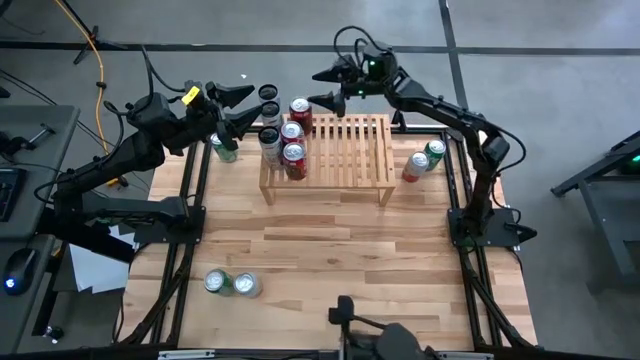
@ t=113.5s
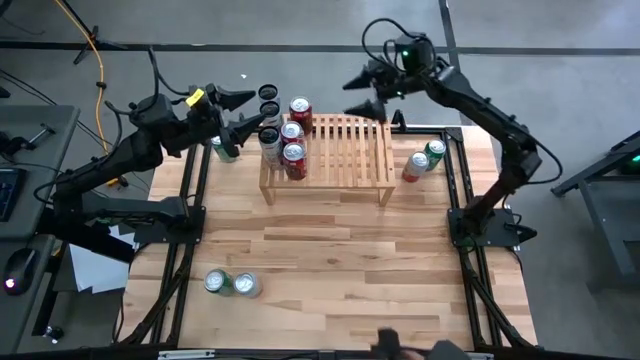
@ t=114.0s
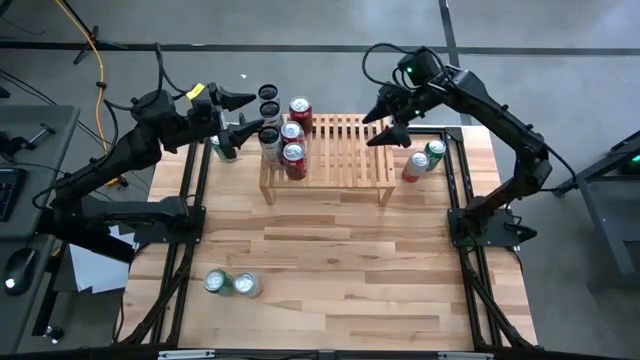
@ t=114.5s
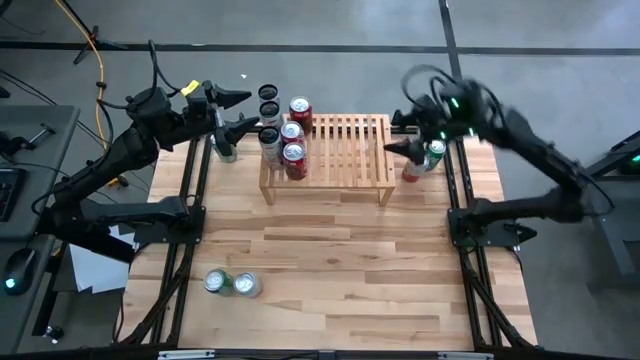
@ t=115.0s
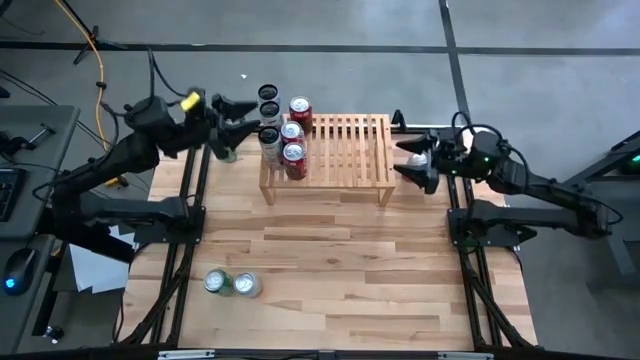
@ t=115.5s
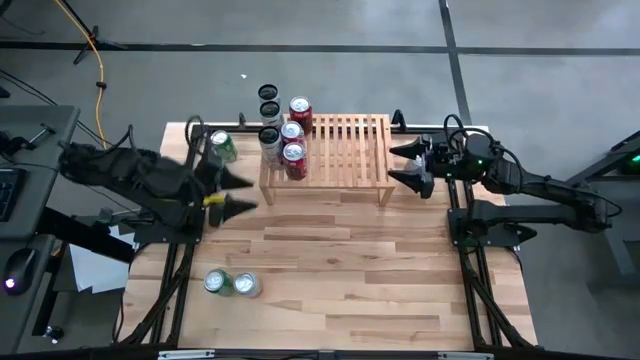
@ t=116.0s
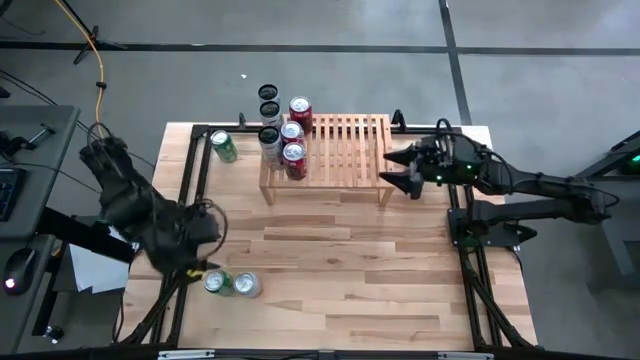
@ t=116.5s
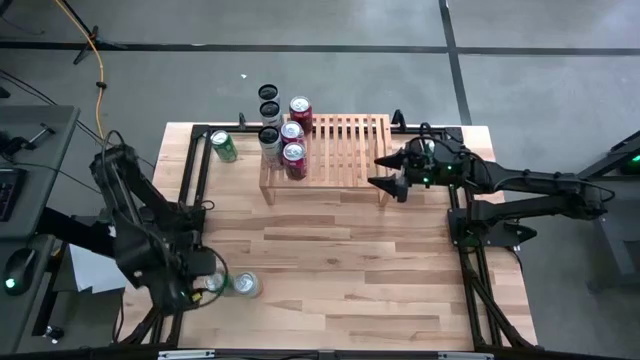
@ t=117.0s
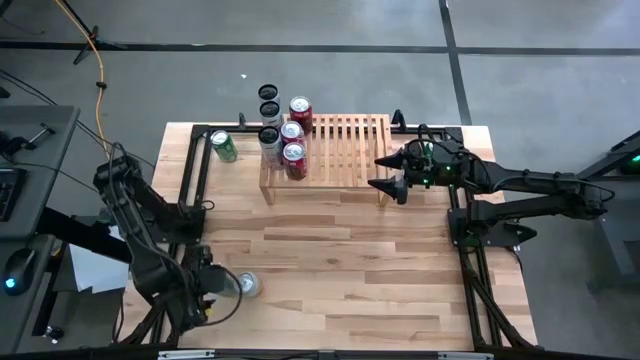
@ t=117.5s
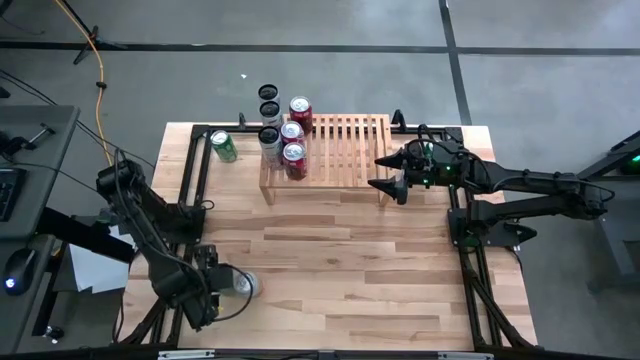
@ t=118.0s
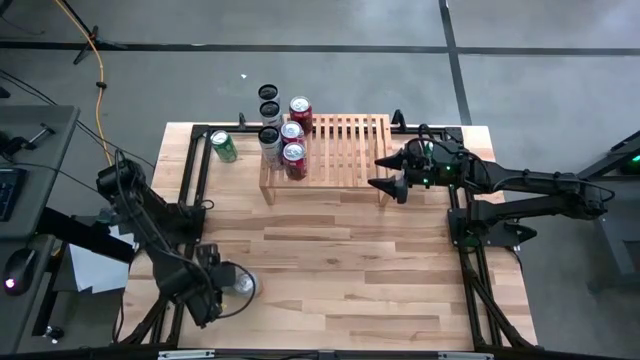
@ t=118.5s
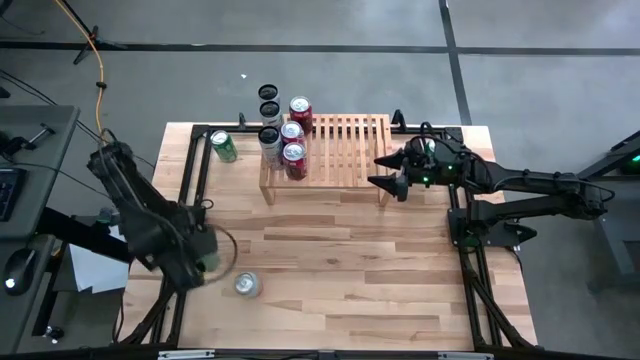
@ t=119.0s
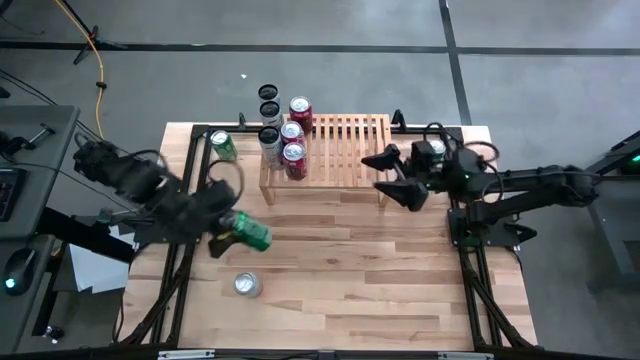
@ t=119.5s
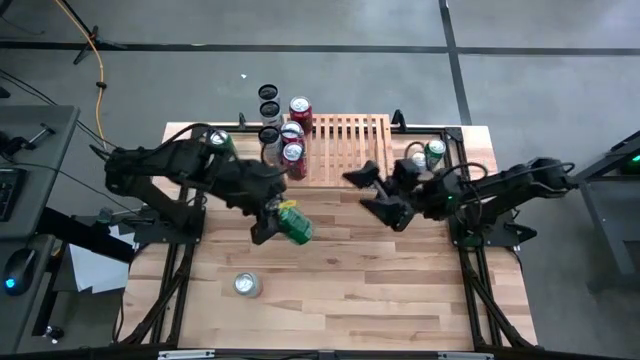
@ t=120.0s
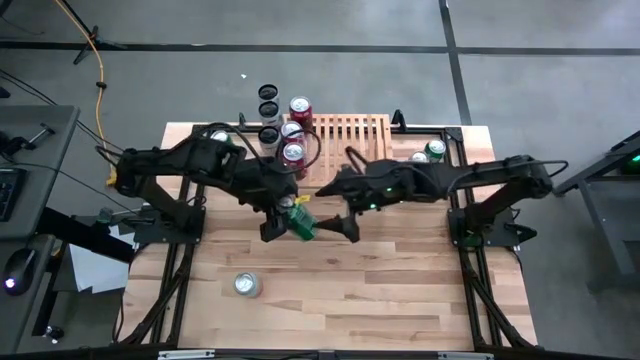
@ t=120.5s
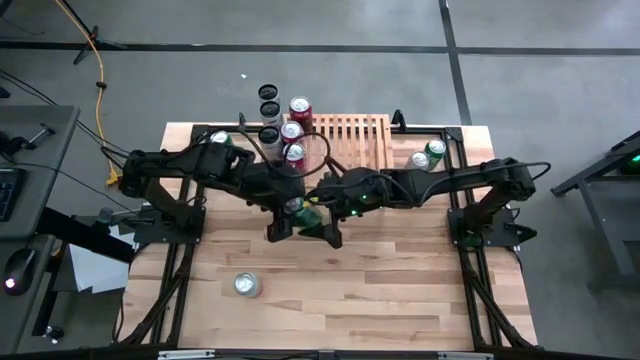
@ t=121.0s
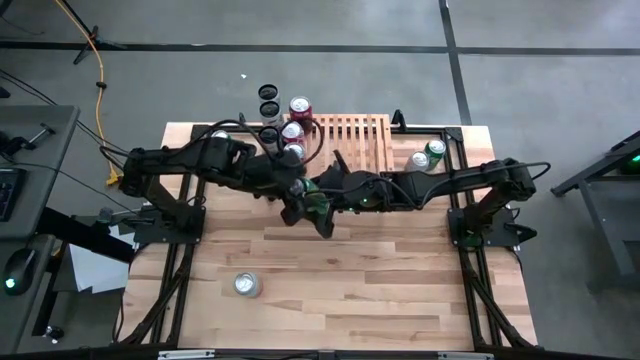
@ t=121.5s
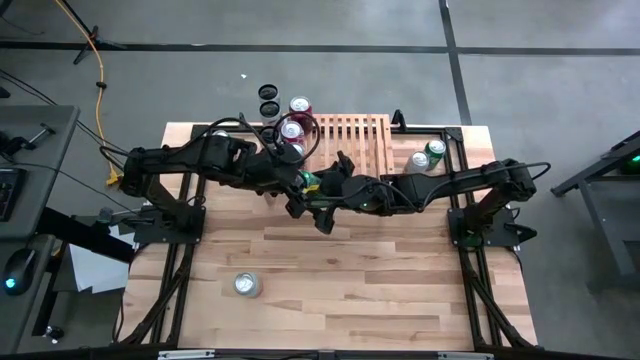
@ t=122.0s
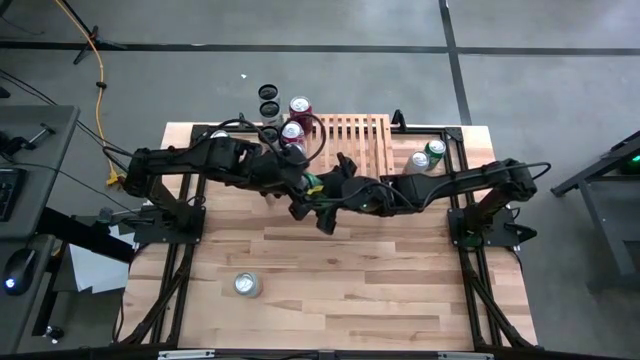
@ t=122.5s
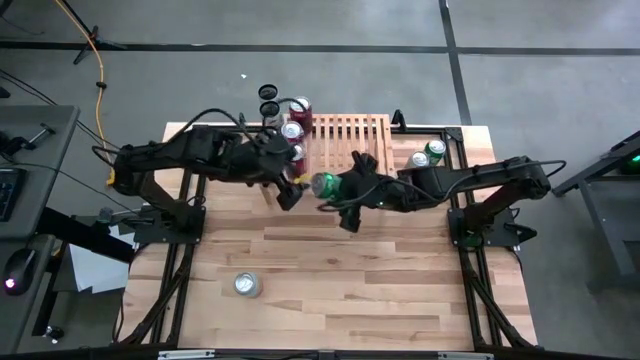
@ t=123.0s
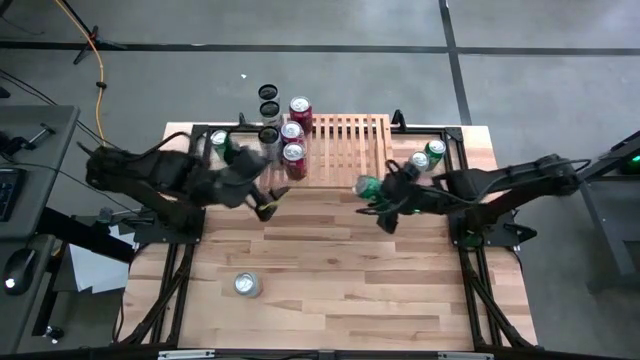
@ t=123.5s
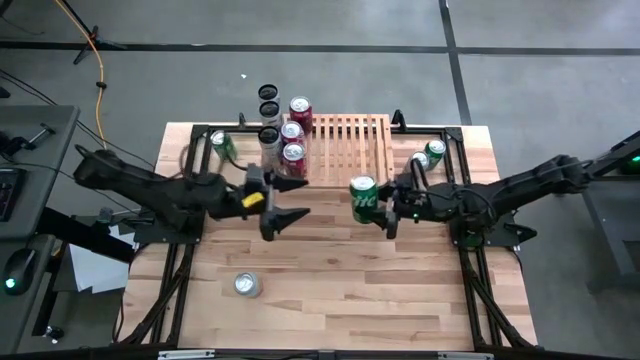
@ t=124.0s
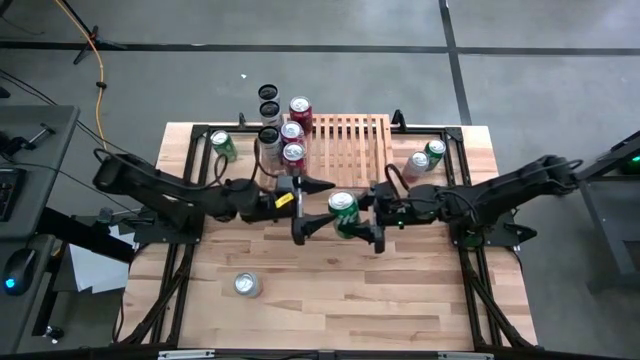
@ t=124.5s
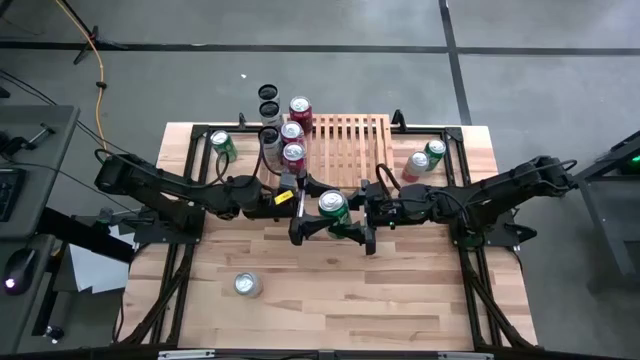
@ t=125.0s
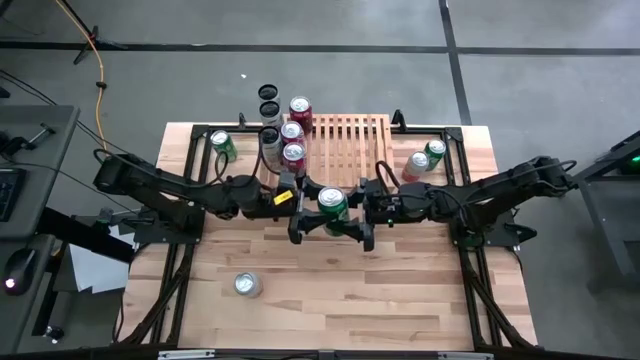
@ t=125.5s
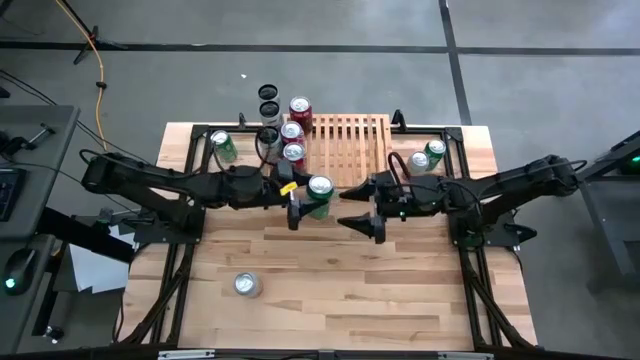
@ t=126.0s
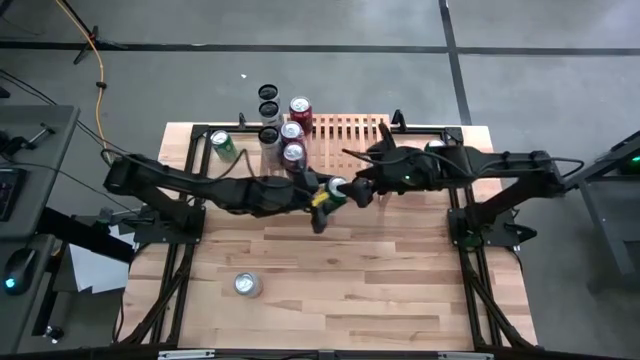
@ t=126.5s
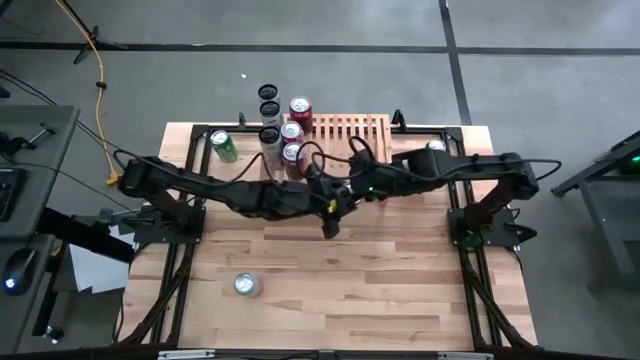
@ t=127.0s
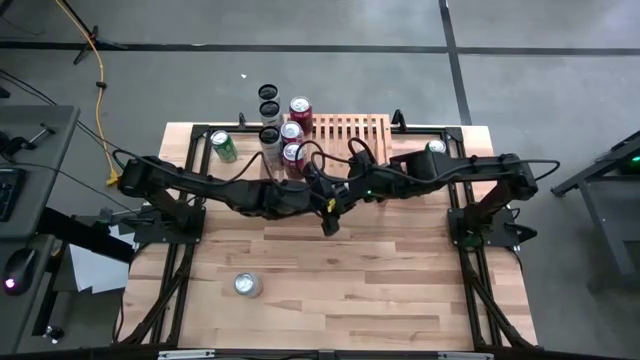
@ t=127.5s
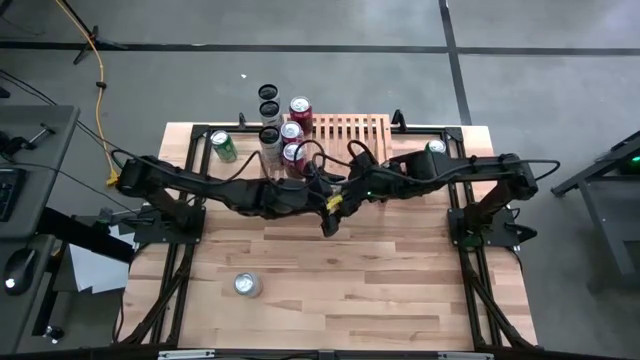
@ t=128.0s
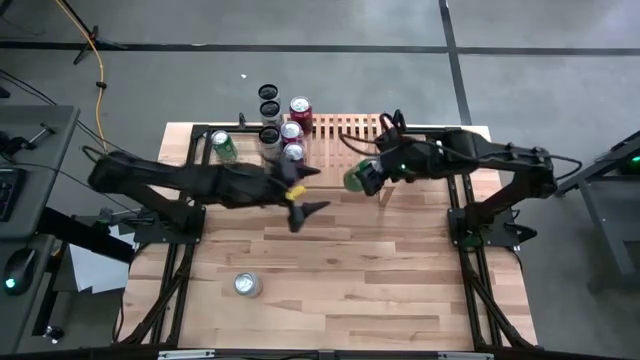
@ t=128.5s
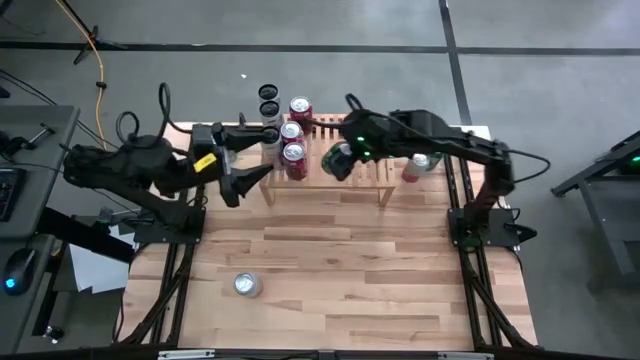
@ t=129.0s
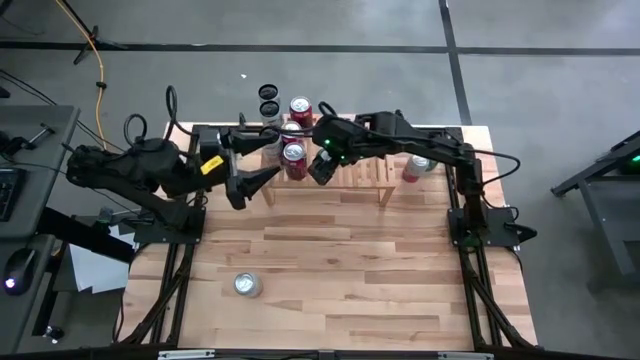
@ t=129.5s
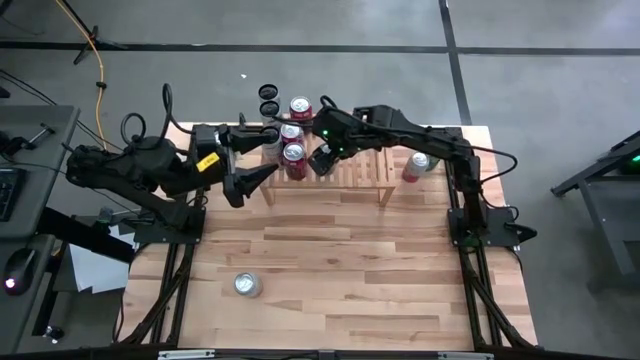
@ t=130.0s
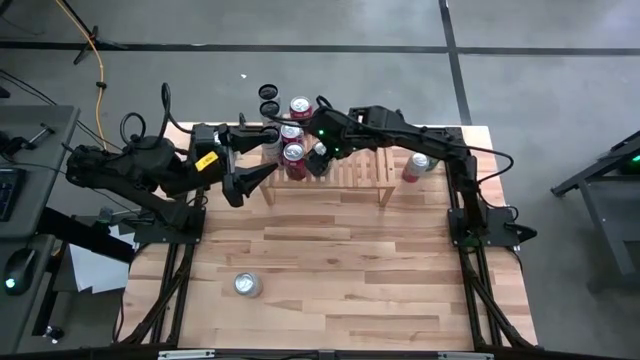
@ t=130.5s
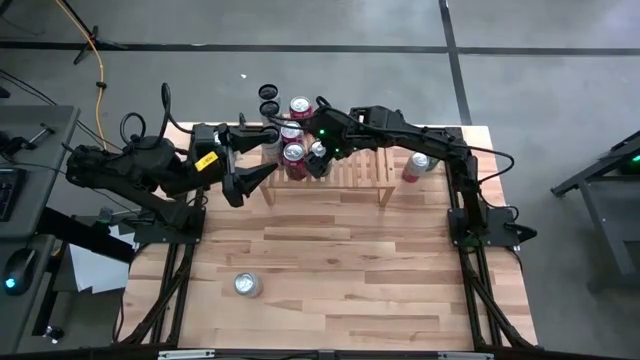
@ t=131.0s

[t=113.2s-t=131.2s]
Task: Place canned beverage on shelf
Put the bottom left green soda can on the shelf

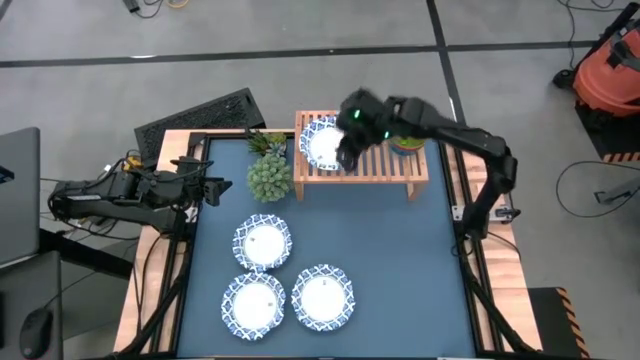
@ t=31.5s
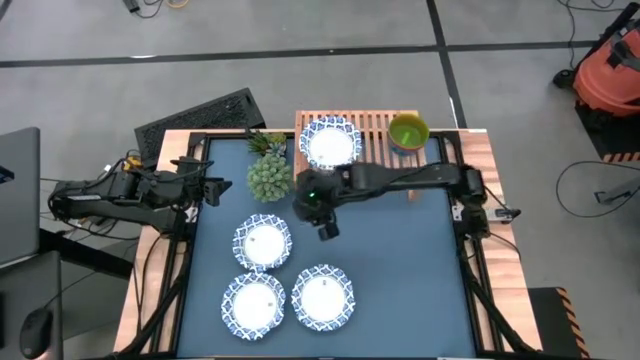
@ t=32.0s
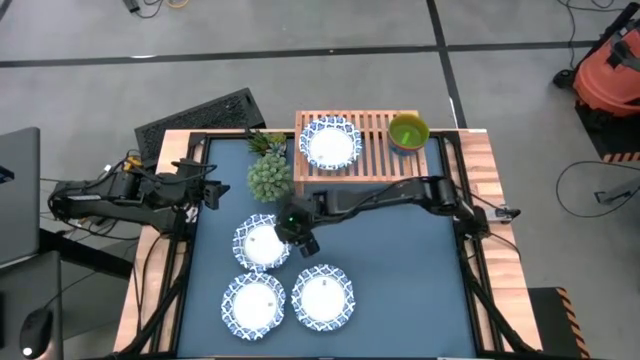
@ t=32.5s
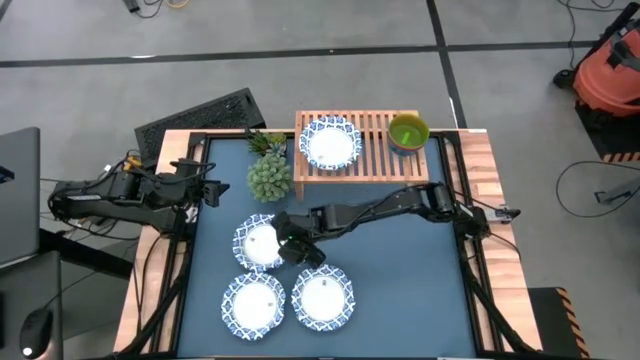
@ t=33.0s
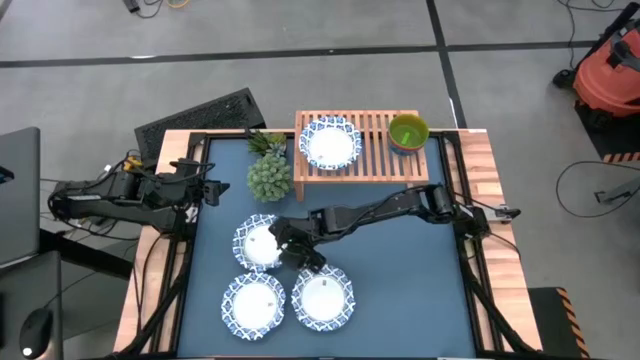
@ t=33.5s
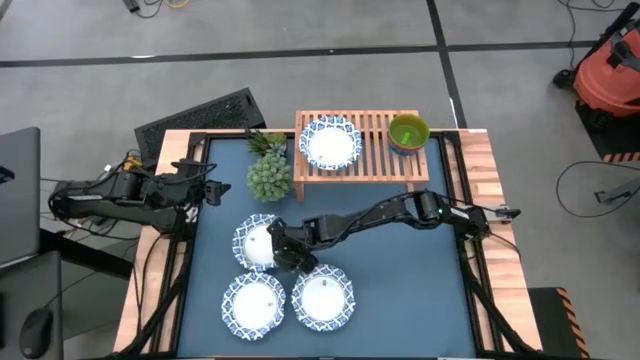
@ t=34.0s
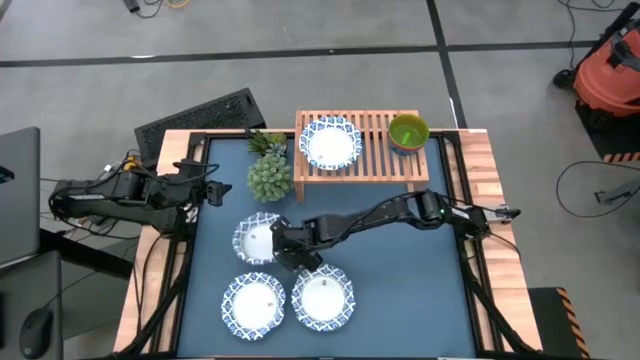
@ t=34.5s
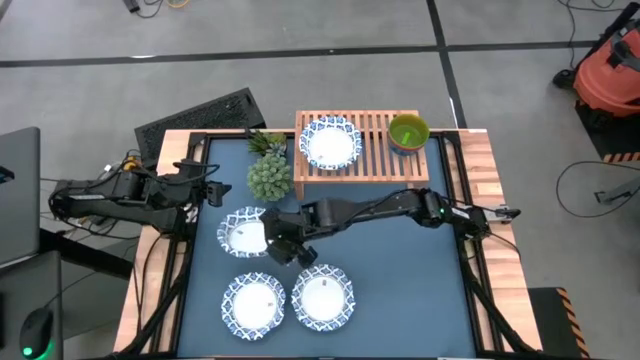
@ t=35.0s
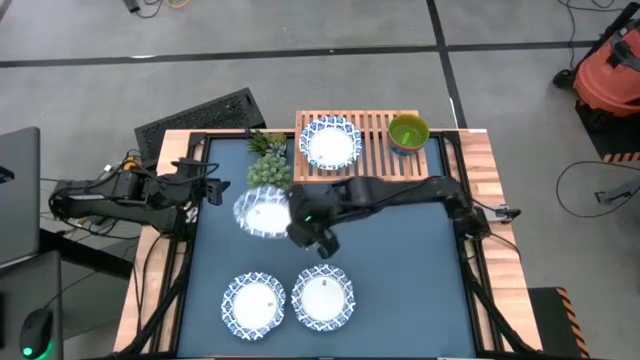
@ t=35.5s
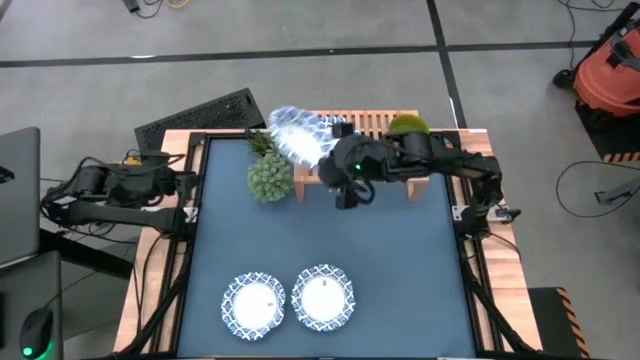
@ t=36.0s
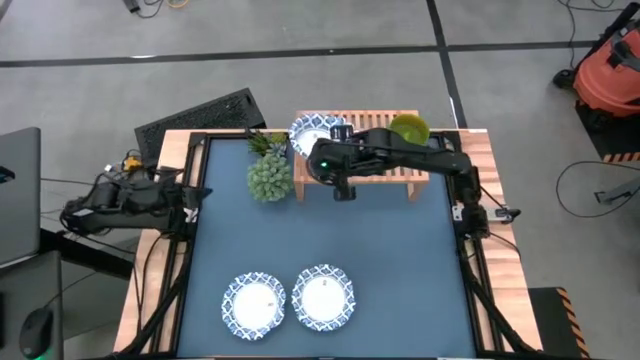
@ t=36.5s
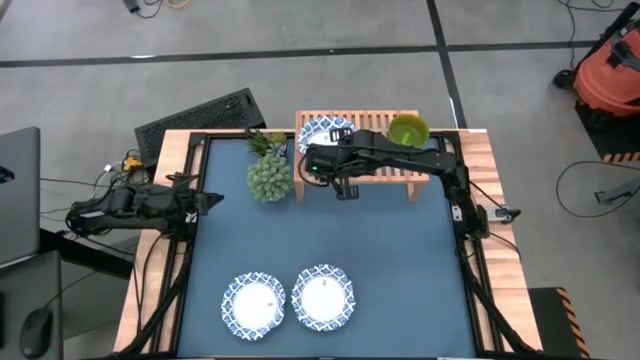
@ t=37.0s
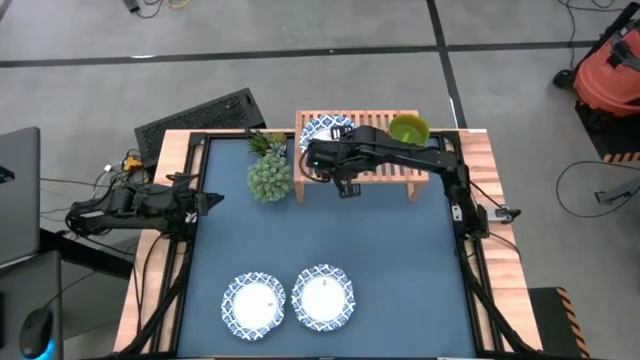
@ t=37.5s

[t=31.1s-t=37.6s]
Task: Place and stack bowls onto a shelf
Stack the white bowl on top of the white bowl on the shelf
